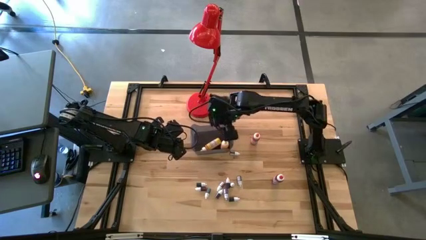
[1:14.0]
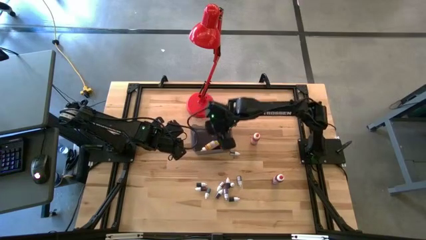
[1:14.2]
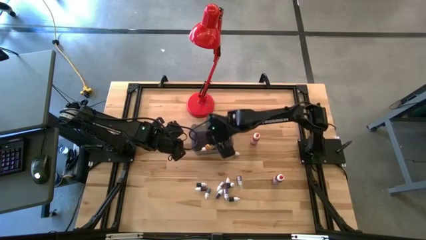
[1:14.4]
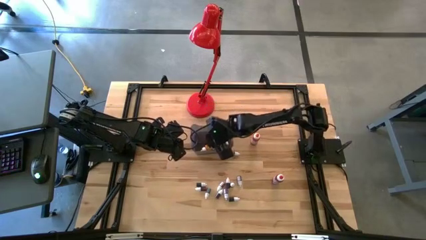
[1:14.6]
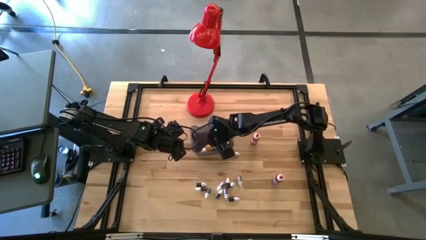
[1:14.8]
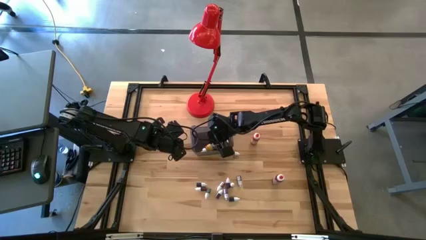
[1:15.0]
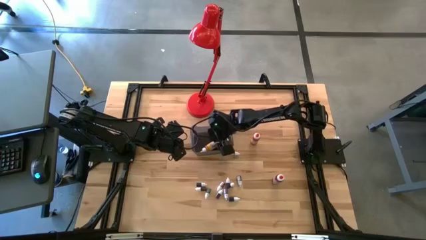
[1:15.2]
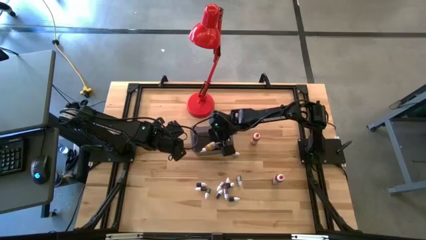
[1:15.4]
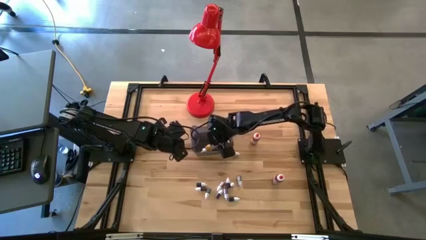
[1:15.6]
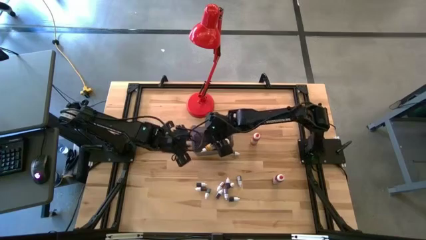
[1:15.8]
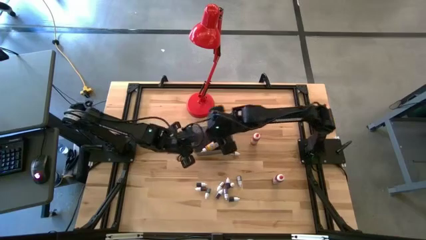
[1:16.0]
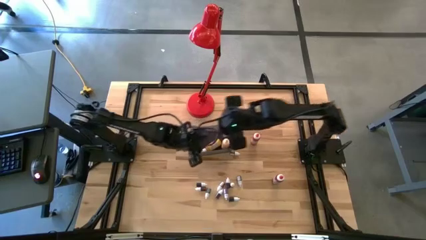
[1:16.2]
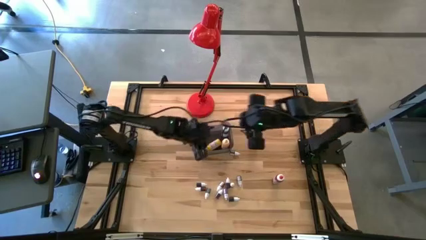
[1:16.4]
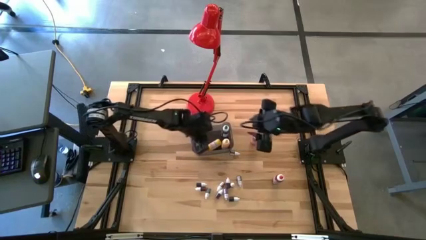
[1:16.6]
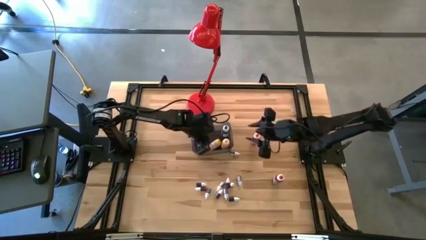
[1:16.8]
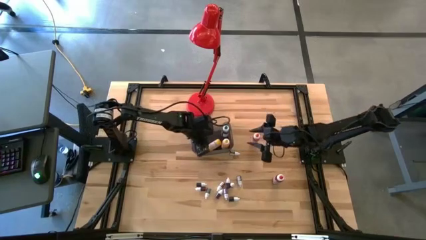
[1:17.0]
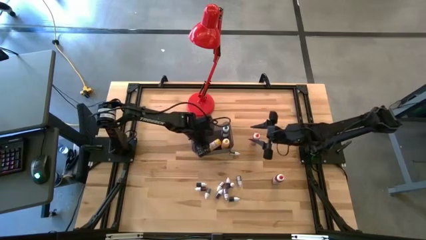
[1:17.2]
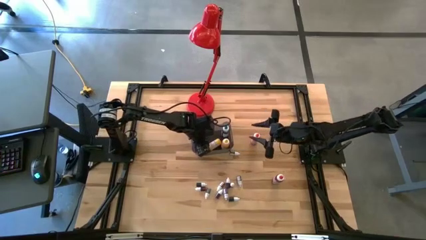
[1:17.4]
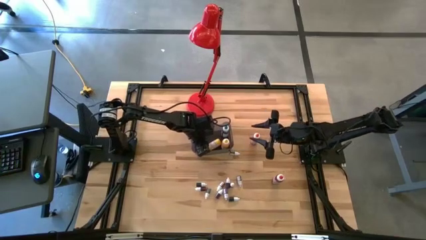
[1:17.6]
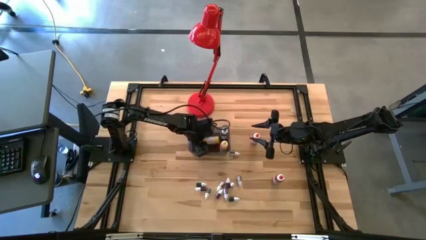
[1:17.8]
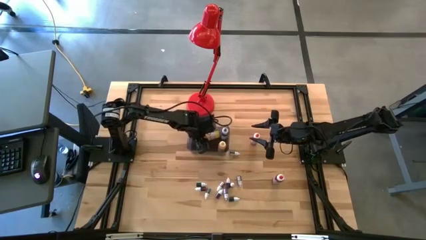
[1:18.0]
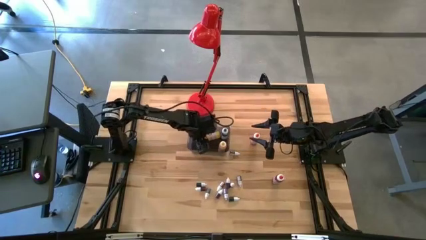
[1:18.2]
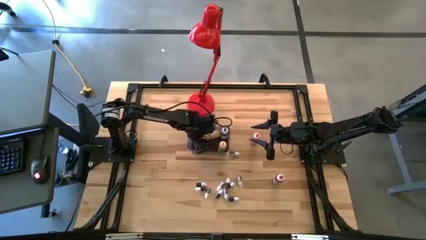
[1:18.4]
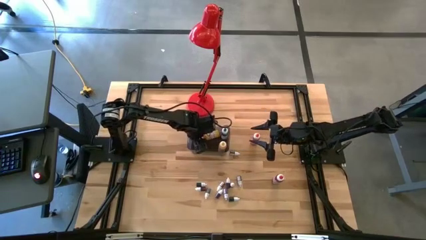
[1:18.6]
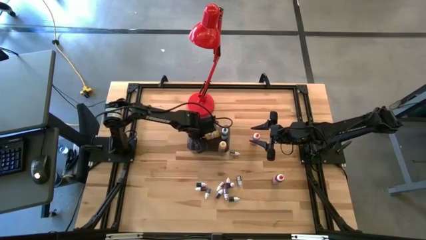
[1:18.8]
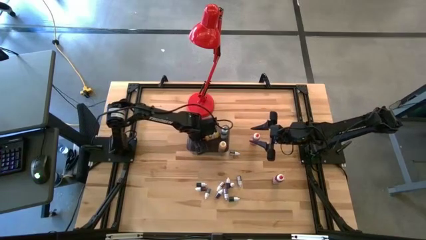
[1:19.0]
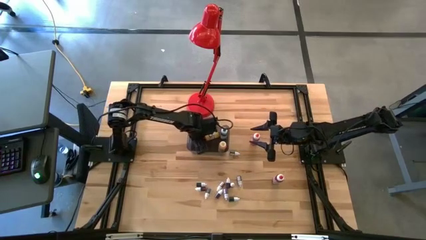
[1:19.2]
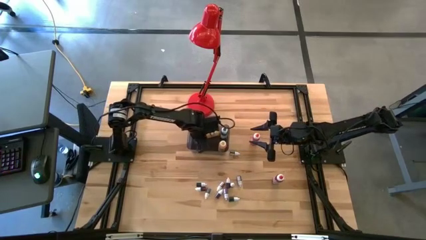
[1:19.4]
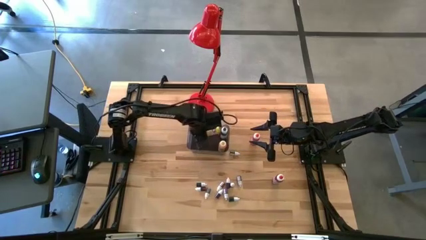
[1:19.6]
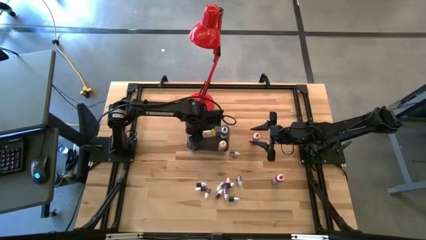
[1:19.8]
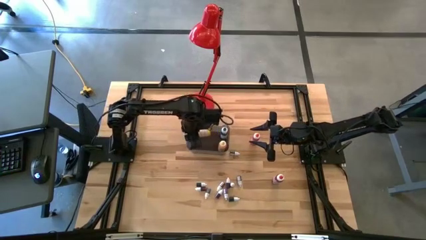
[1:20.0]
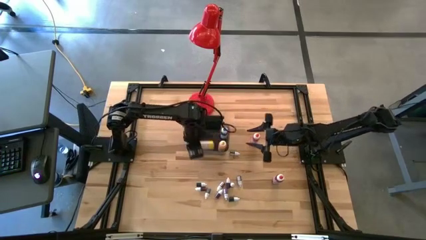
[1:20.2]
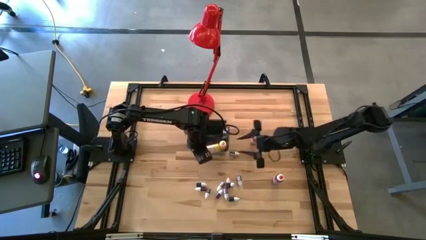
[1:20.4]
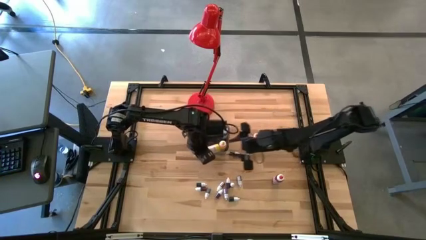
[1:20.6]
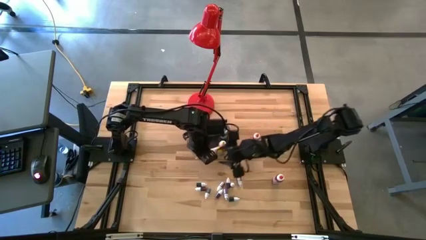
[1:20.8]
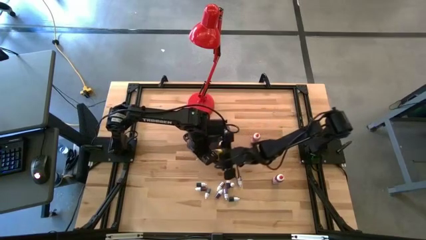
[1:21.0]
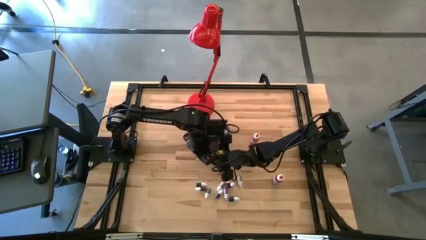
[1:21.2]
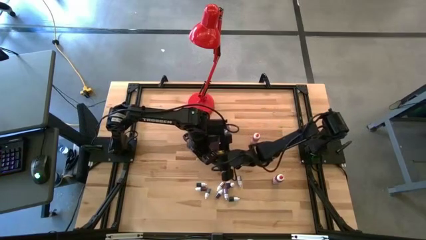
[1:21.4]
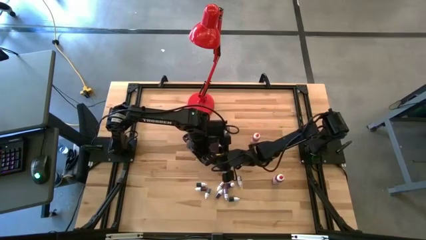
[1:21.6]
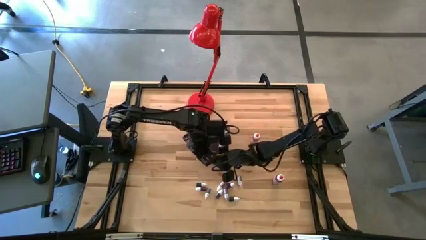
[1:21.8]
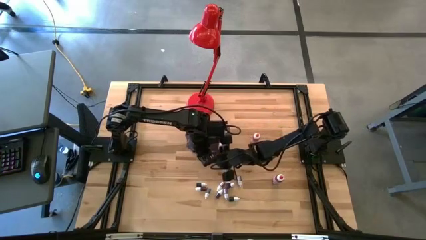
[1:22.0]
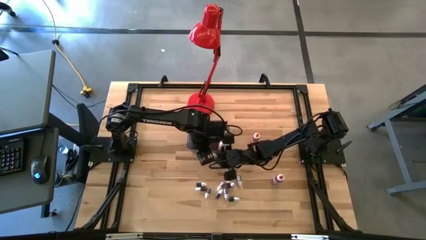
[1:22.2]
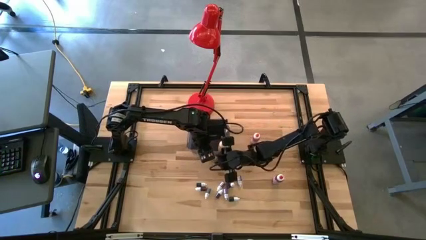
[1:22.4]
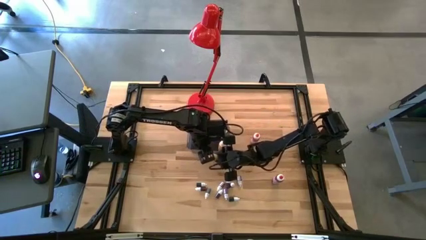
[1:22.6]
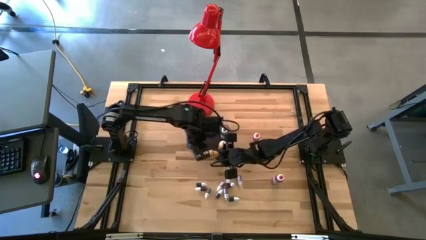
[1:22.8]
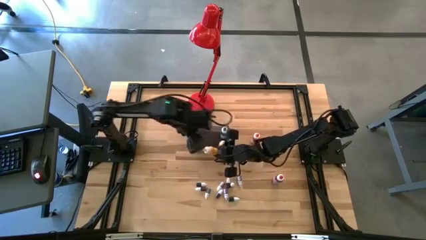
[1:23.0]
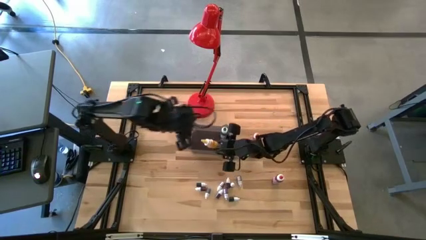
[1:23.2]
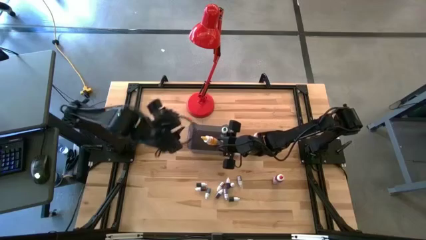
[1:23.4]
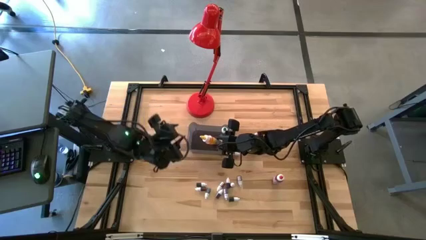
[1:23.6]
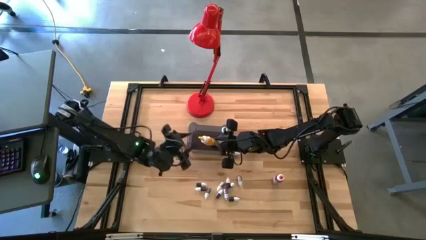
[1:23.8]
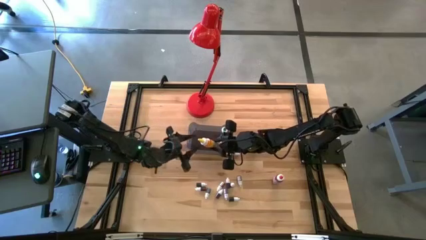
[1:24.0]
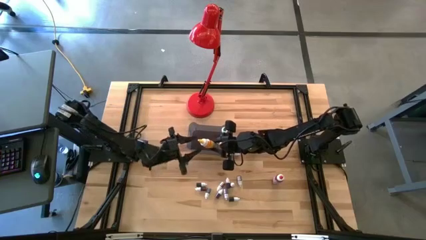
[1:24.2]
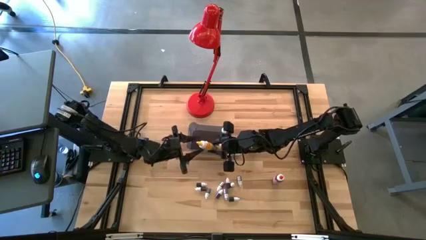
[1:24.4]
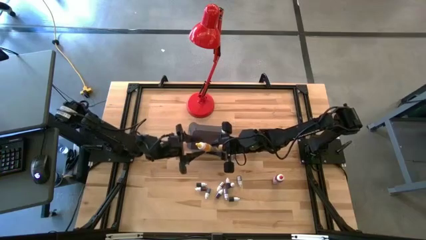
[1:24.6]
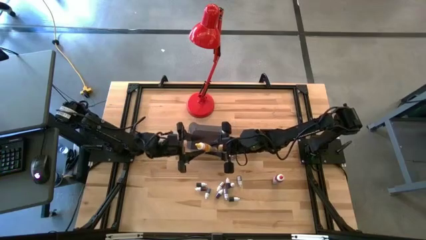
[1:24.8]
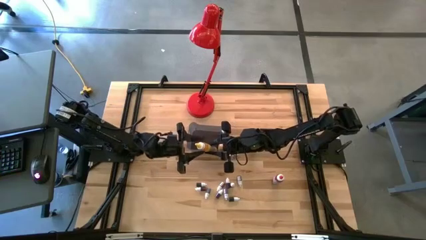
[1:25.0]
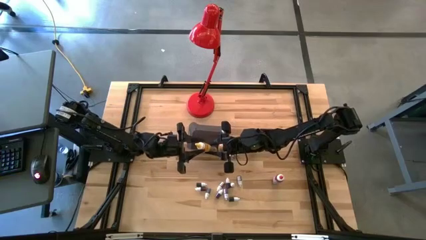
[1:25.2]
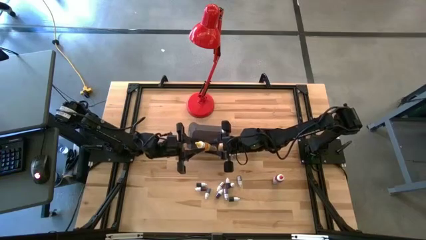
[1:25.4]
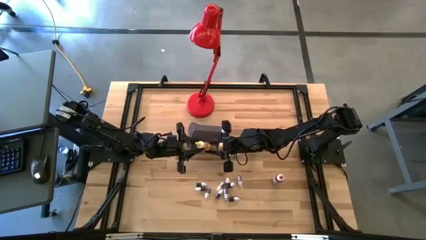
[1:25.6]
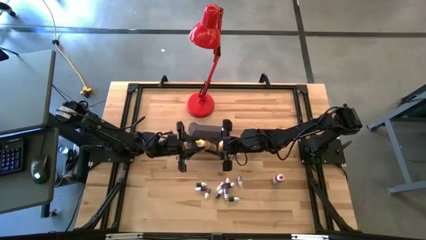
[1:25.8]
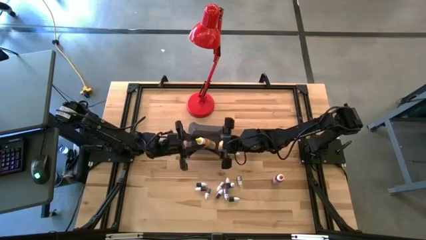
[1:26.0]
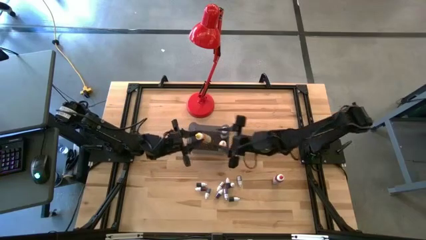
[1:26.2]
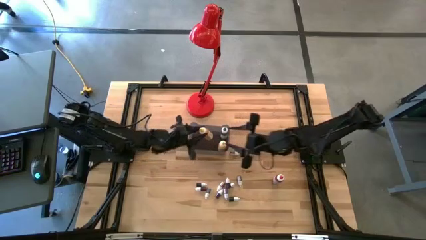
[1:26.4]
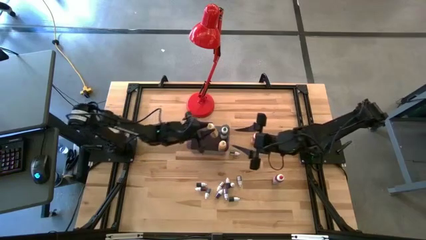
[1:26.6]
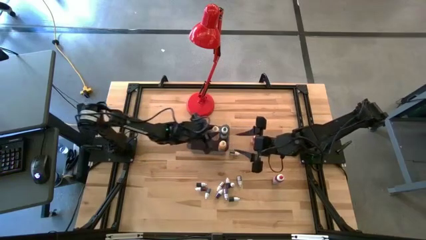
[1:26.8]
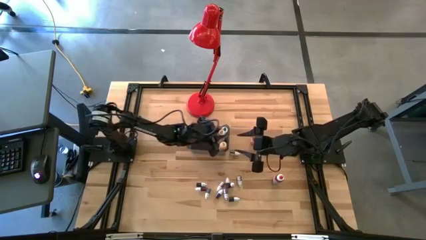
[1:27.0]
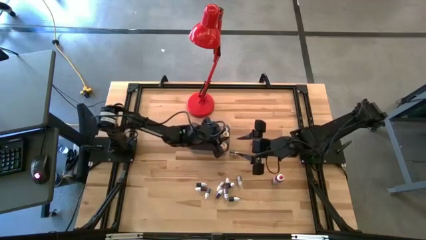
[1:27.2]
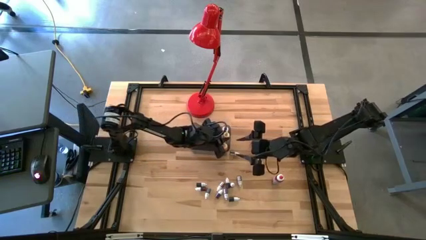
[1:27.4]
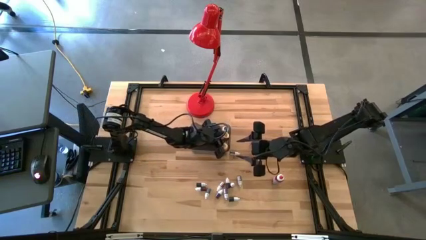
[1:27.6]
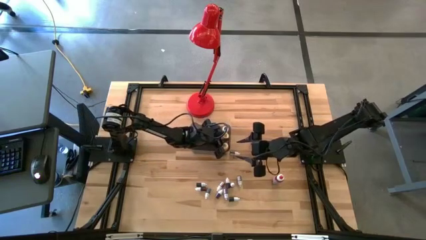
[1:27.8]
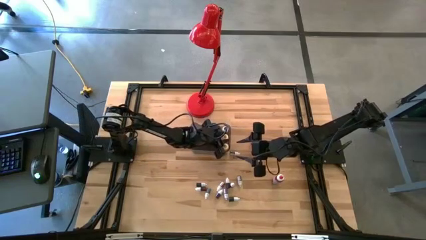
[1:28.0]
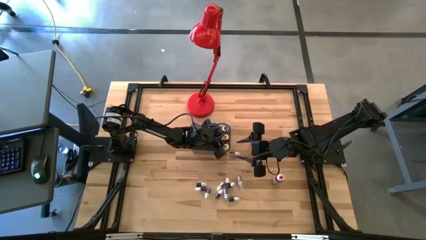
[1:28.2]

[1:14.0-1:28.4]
Task: Pick & Place food coloring
Adjust the large yellow food coloring bottle in the black bin

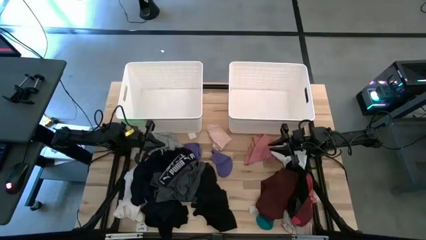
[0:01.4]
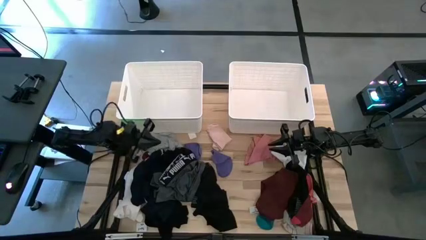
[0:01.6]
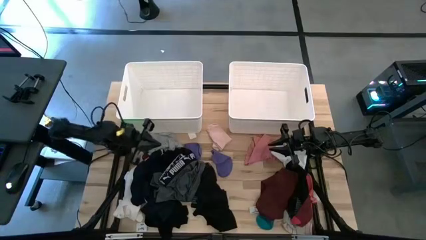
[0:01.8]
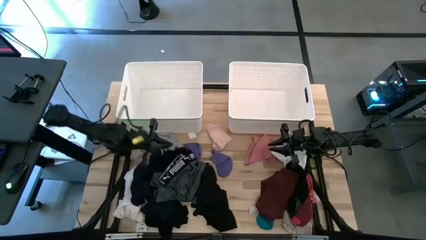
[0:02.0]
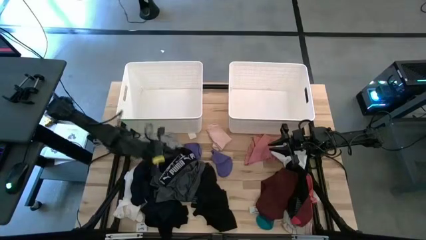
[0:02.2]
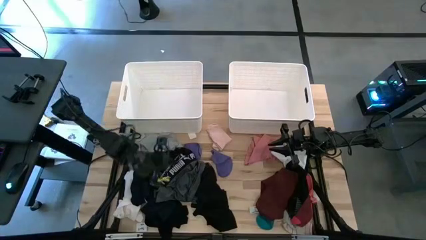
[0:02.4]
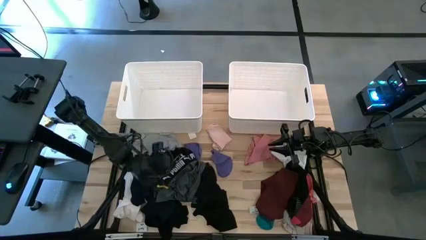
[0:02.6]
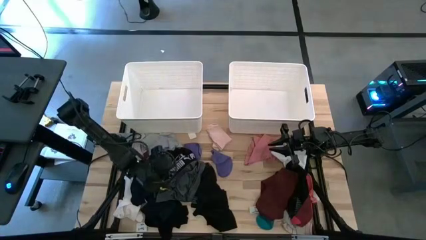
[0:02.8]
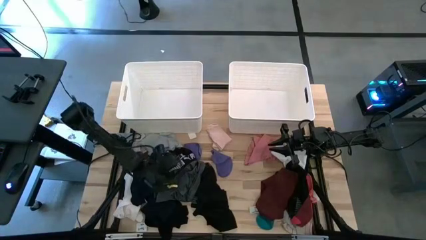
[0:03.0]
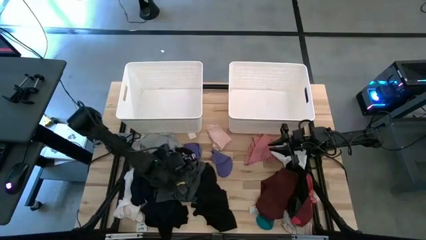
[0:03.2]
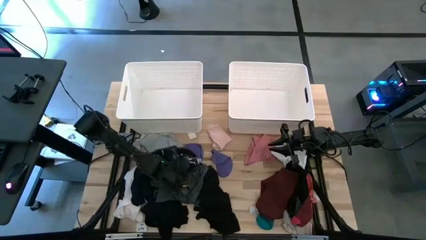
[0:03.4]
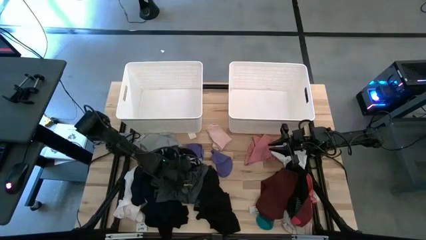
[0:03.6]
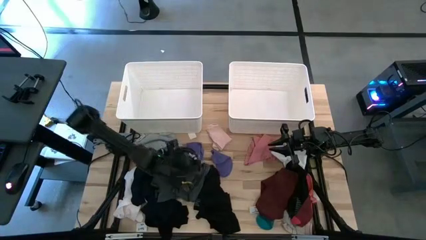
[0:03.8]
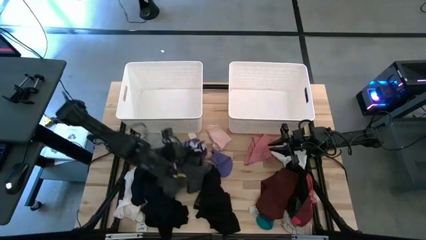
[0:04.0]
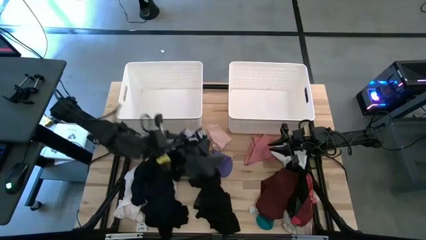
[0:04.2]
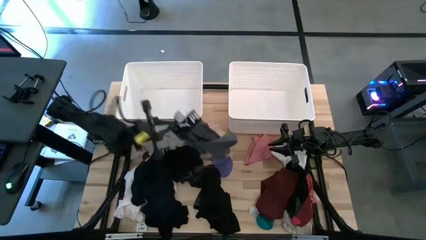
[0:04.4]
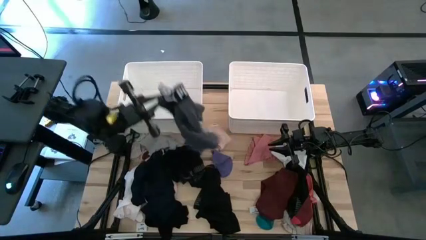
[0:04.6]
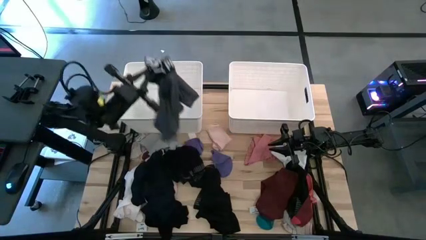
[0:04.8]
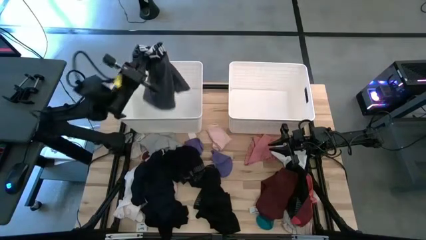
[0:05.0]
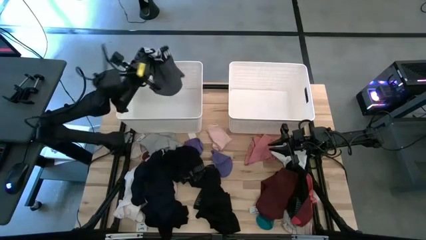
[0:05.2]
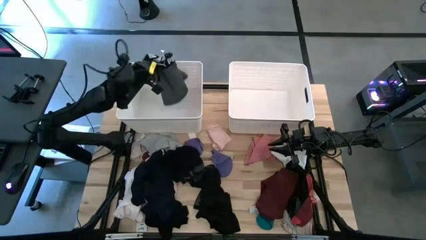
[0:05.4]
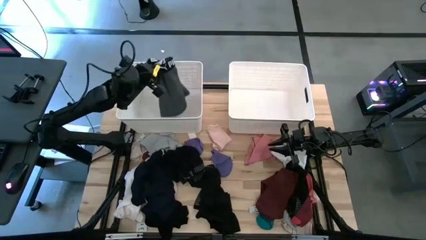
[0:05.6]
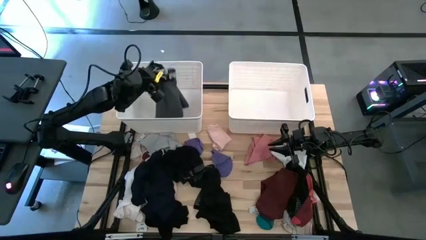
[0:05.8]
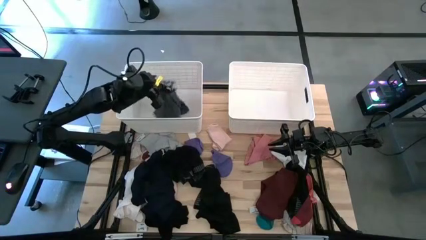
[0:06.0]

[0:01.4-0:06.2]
Task: Sort clothes
Put the gray boxer into the left white laundry bin
